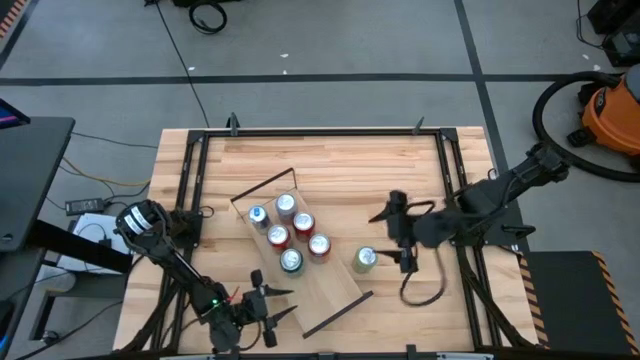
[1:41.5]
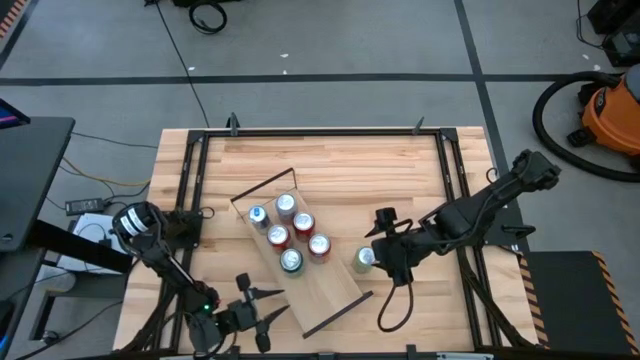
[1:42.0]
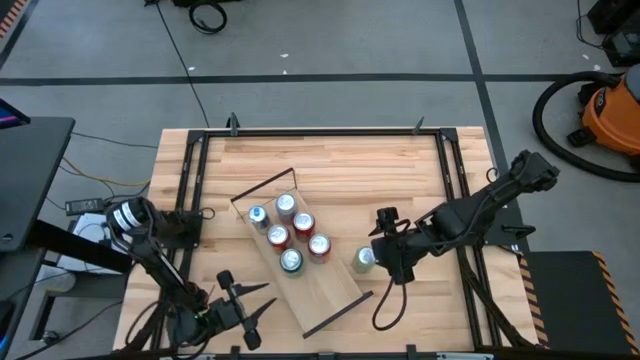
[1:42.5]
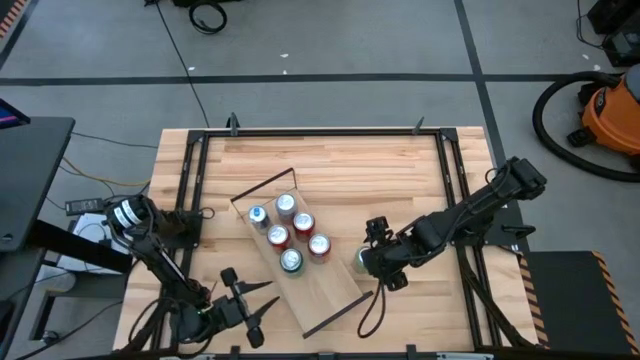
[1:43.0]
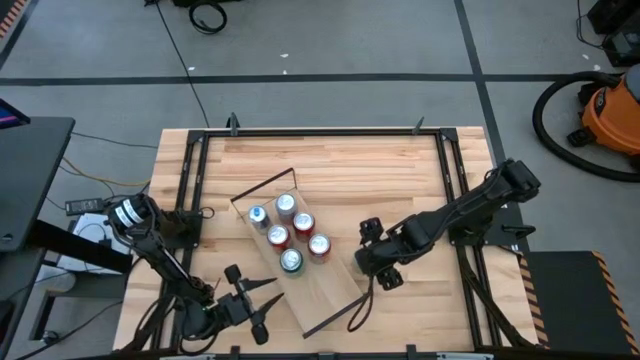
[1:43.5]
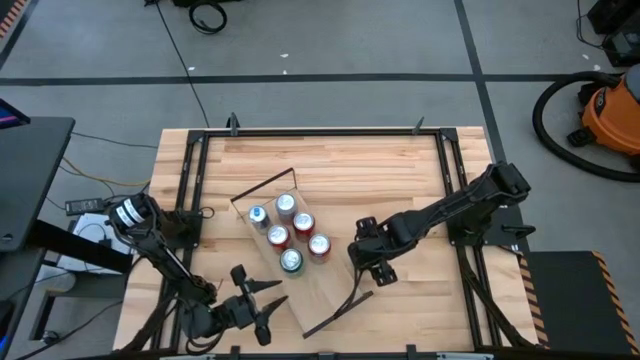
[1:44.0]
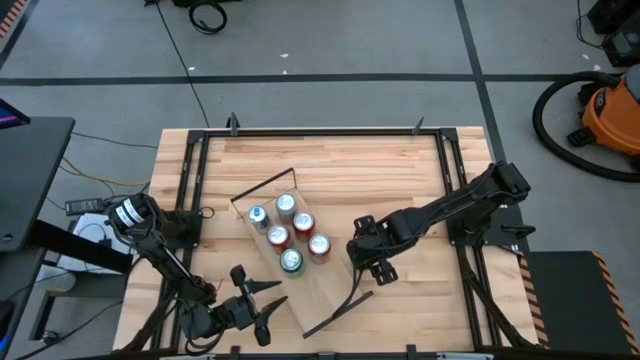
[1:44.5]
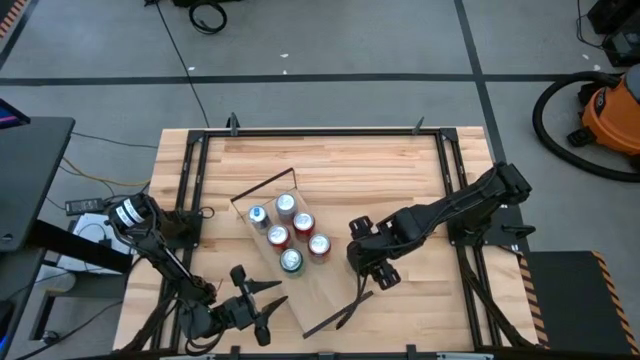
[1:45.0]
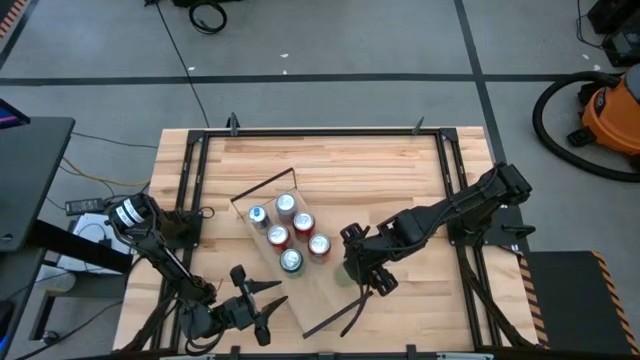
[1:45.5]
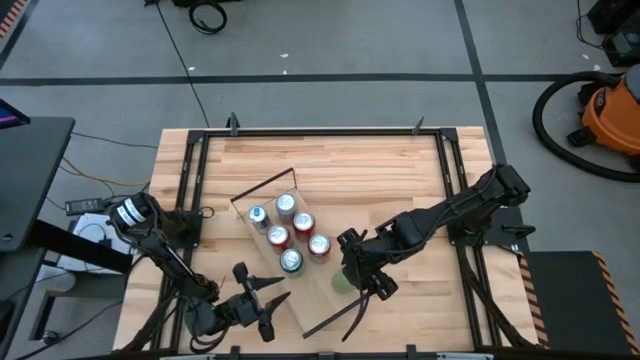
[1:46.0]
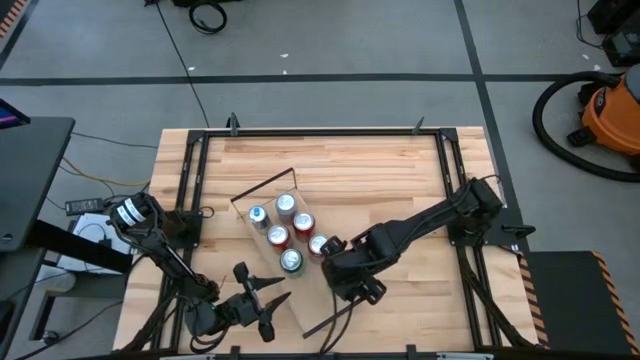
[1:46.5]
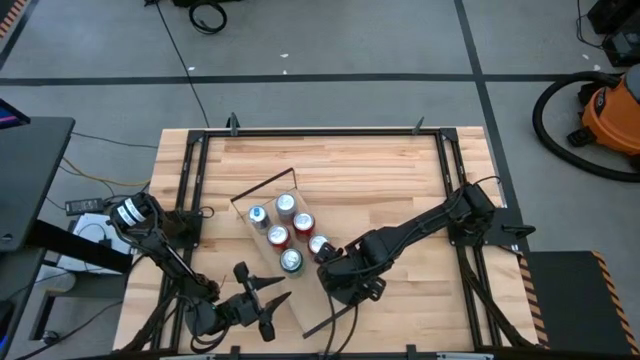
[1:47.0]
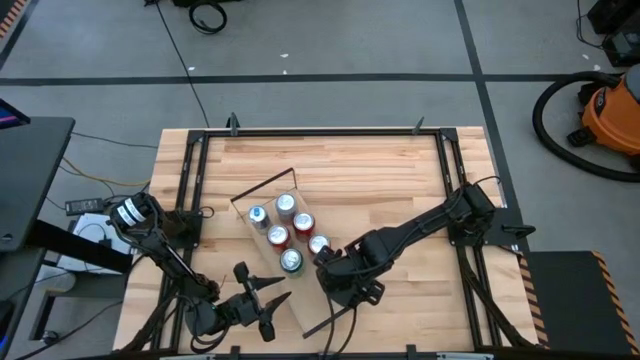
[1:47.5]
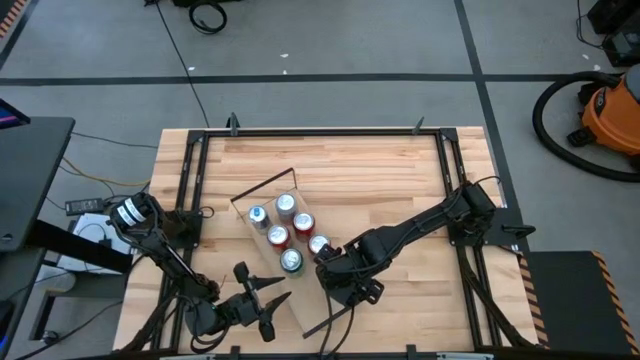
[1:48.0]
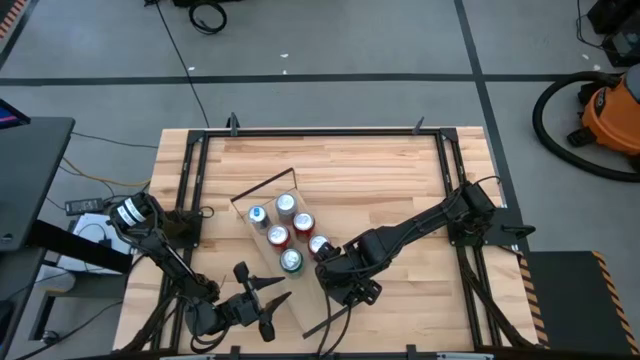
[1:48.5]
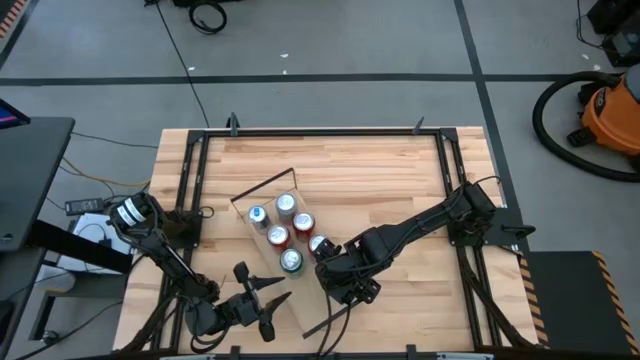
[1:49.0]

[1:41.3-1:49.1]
Task: Place canned beverage on shelf
Put the light green soda can on the shelf

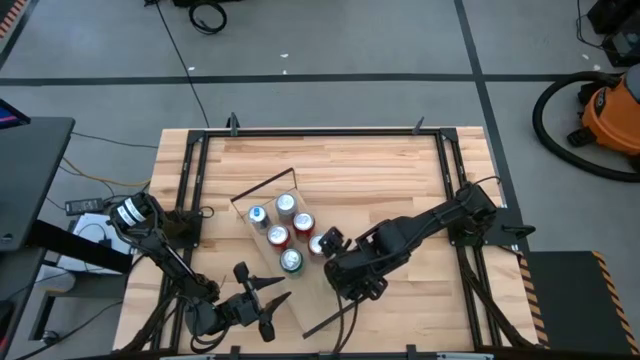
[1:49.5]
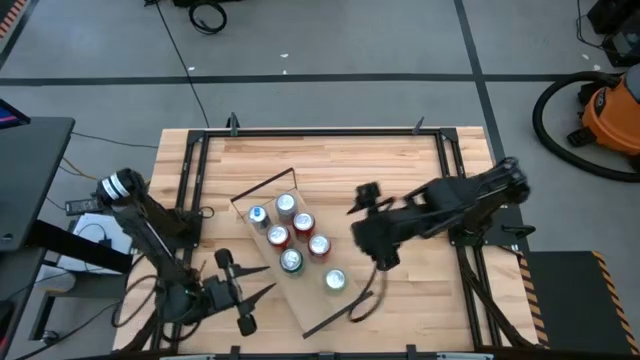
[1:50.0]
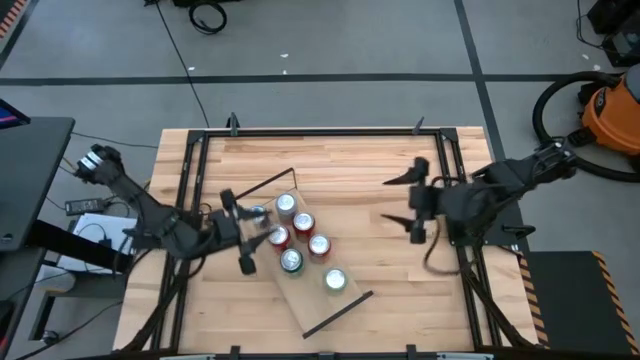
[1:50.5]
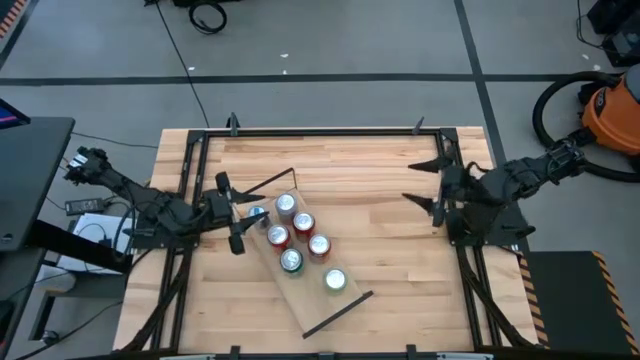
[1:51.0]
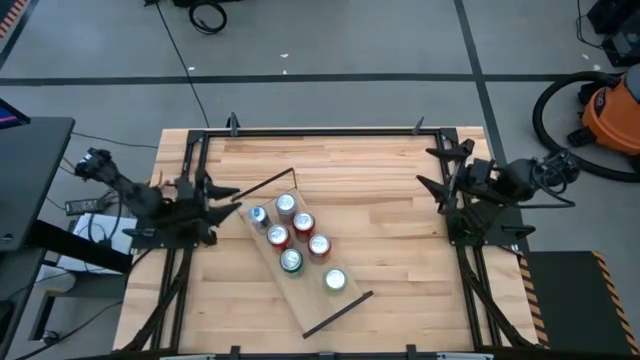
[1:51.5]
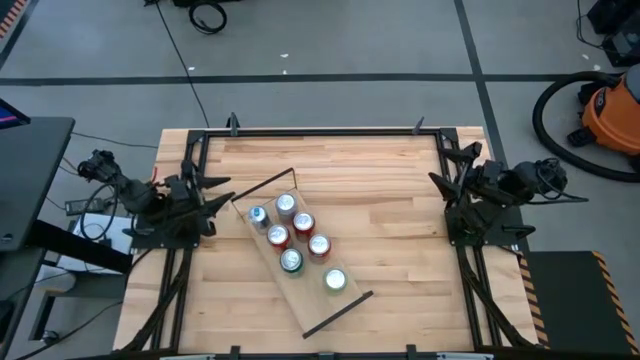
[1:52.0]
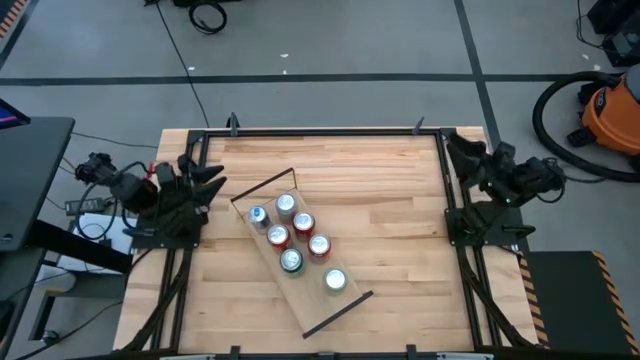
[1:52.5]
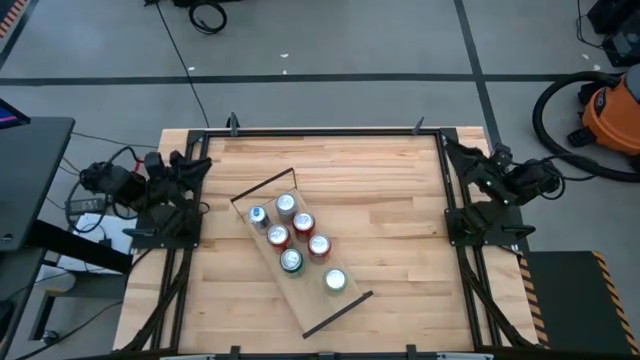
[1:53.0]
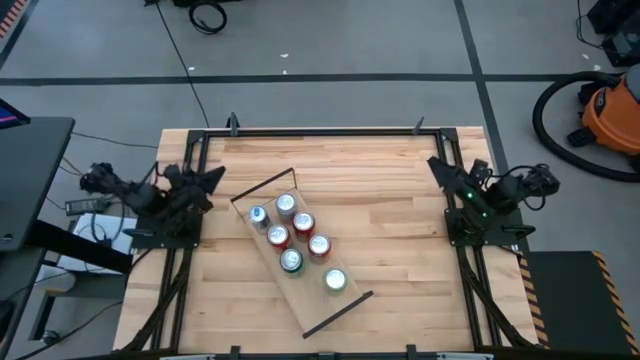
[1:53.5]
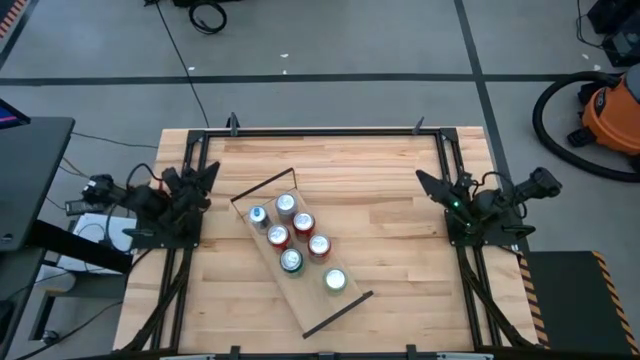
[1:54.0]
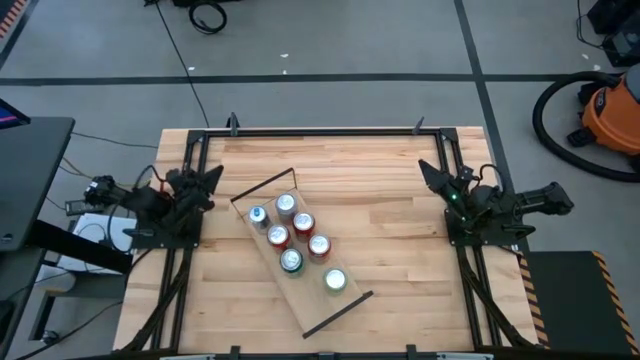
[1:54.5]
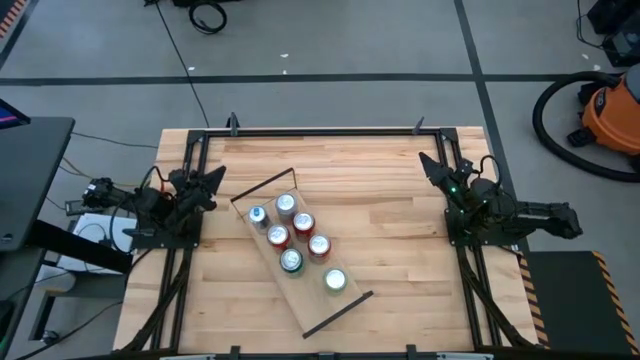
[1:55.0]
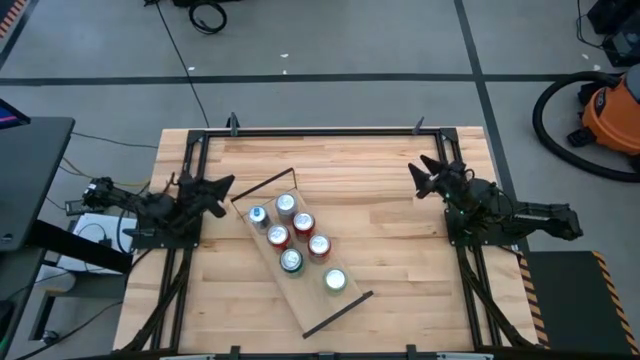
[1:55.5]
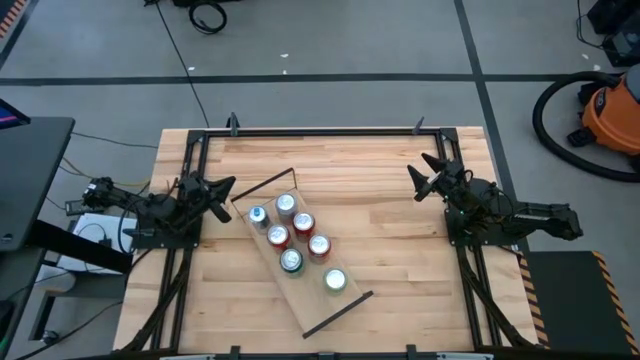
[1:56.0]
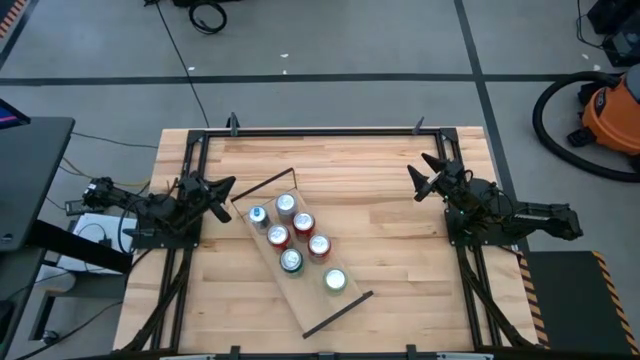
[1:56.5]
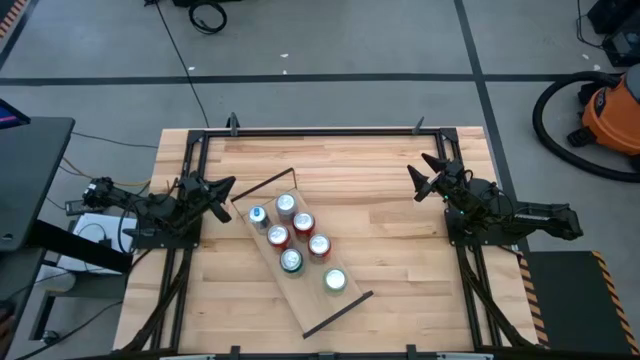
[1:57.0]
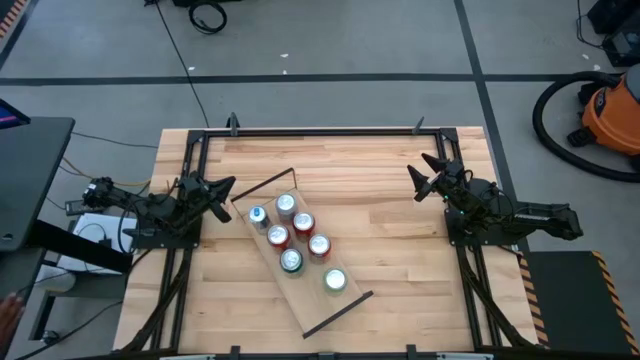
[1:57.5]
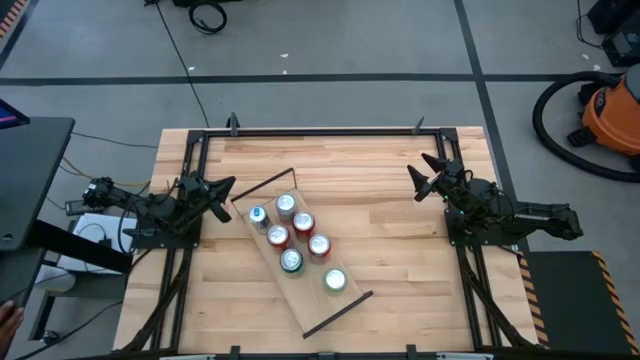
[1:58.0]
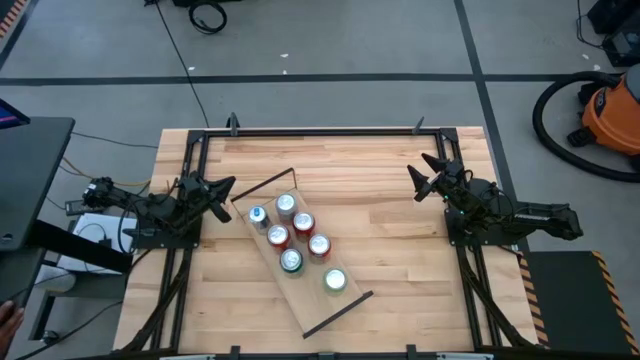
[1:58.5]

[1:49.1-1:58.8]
Return to Home Position
